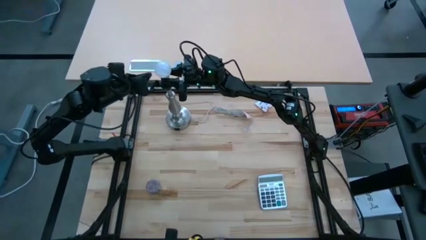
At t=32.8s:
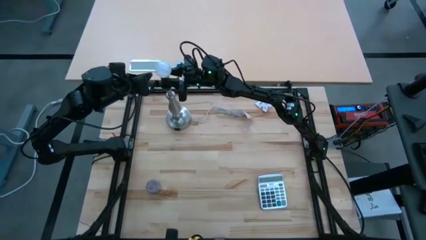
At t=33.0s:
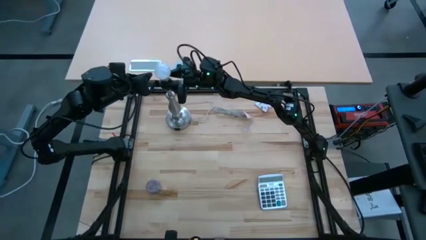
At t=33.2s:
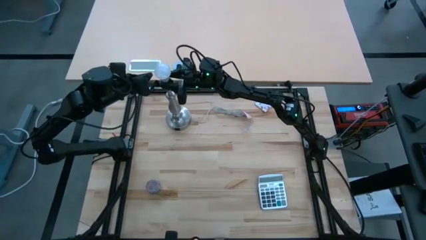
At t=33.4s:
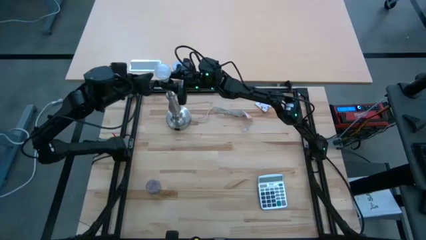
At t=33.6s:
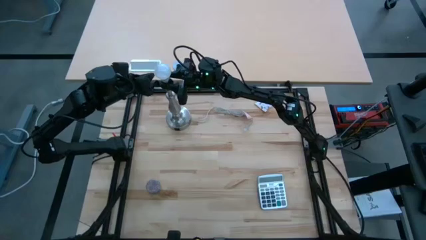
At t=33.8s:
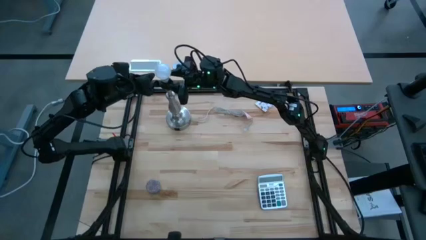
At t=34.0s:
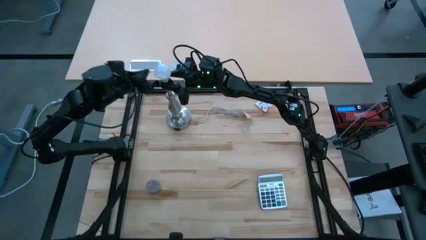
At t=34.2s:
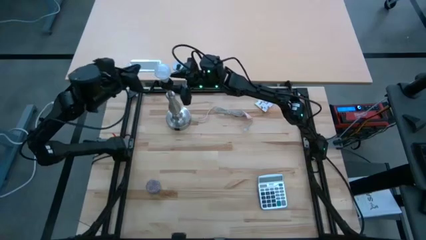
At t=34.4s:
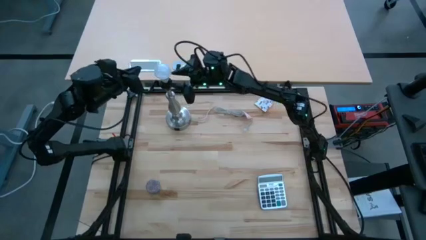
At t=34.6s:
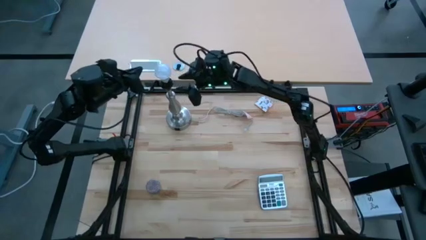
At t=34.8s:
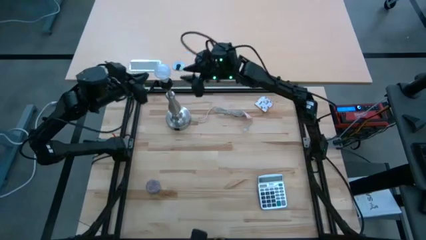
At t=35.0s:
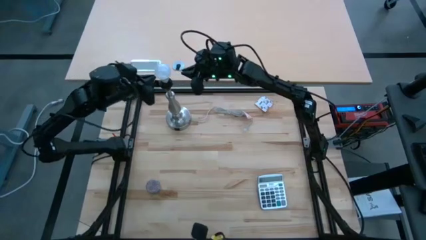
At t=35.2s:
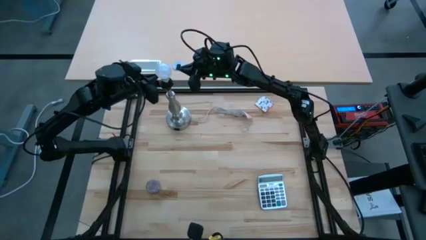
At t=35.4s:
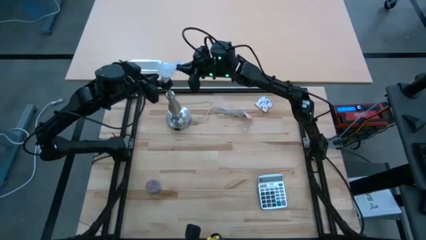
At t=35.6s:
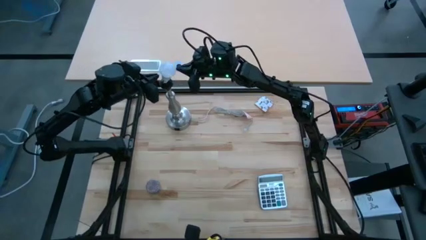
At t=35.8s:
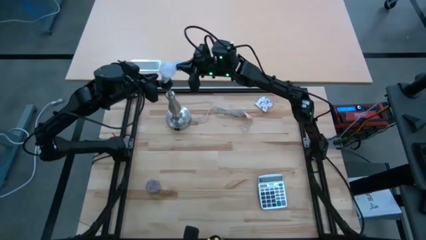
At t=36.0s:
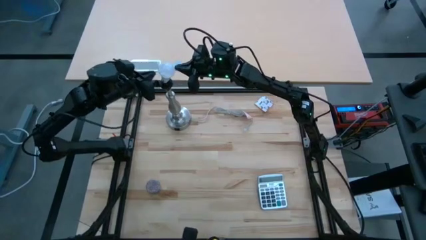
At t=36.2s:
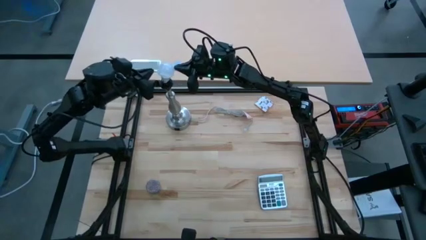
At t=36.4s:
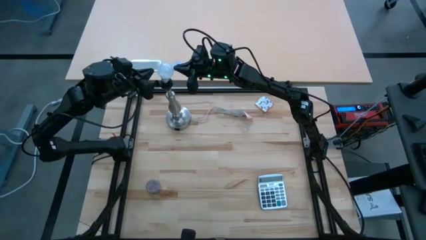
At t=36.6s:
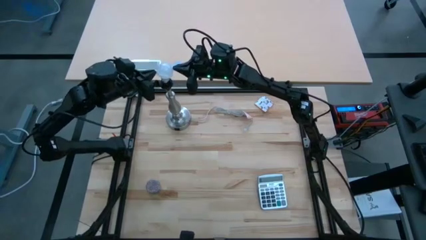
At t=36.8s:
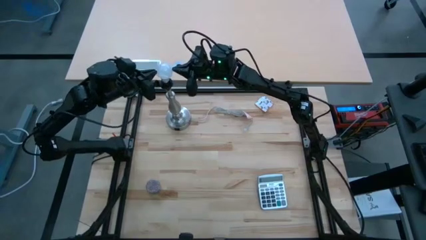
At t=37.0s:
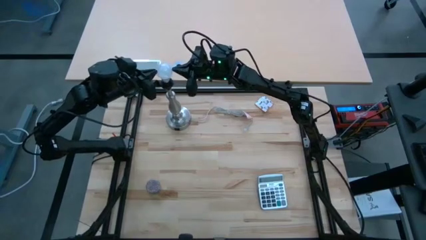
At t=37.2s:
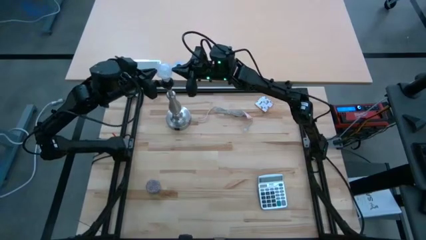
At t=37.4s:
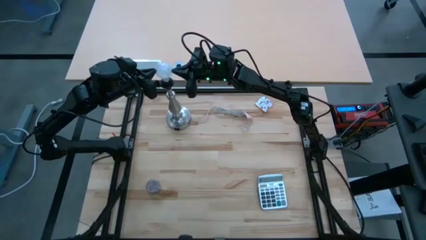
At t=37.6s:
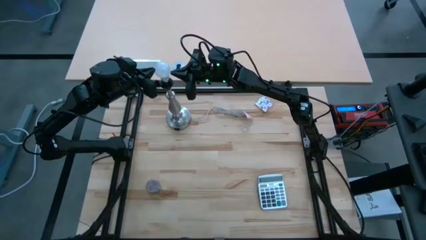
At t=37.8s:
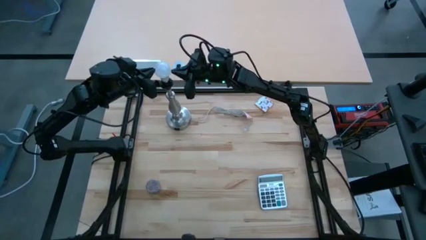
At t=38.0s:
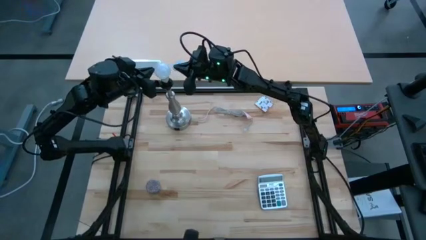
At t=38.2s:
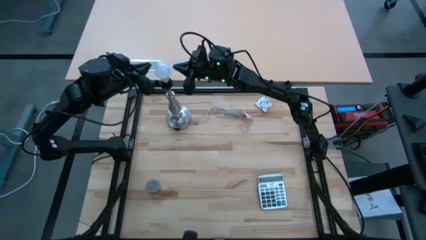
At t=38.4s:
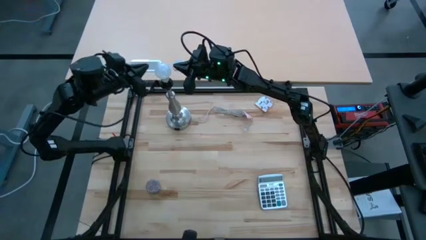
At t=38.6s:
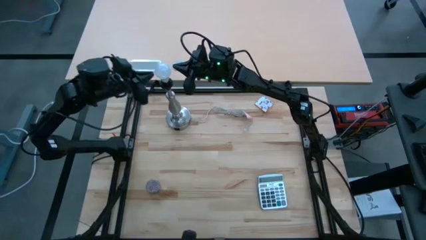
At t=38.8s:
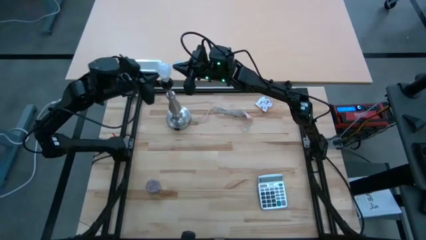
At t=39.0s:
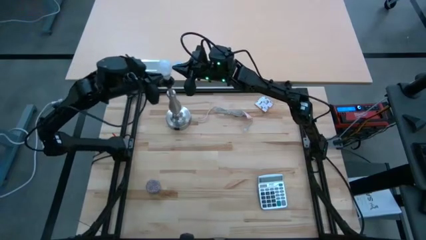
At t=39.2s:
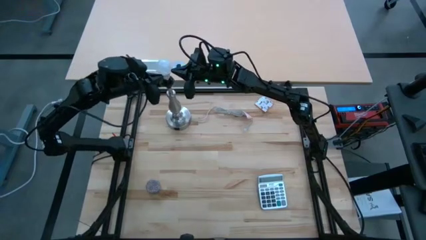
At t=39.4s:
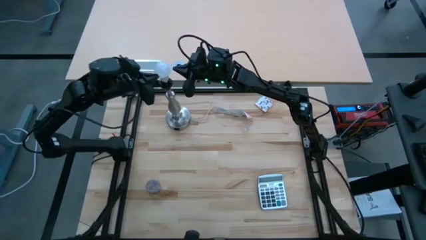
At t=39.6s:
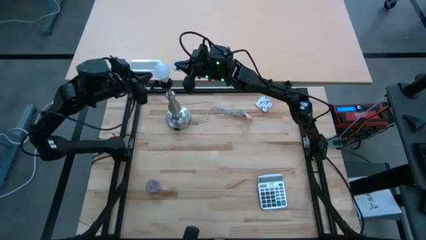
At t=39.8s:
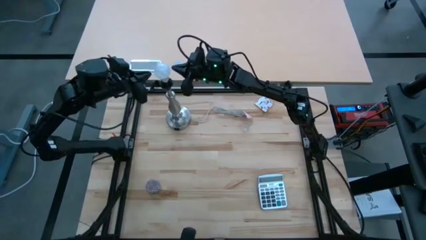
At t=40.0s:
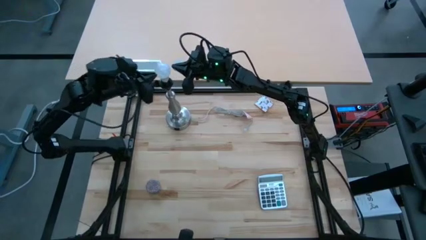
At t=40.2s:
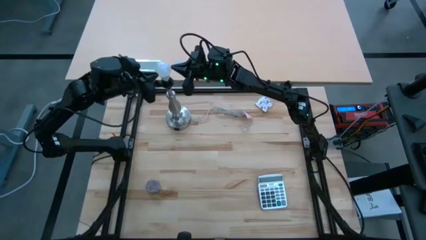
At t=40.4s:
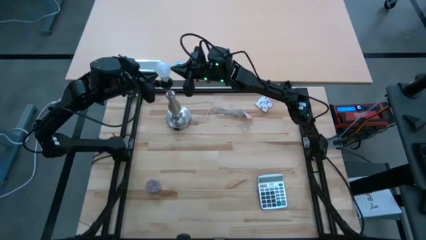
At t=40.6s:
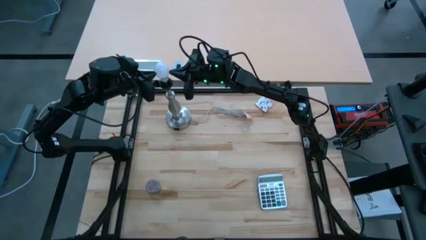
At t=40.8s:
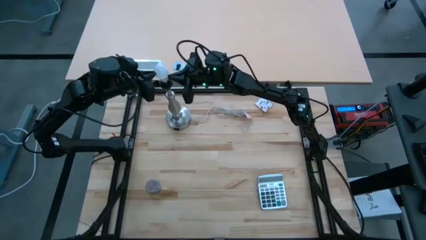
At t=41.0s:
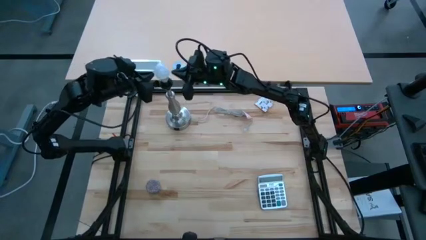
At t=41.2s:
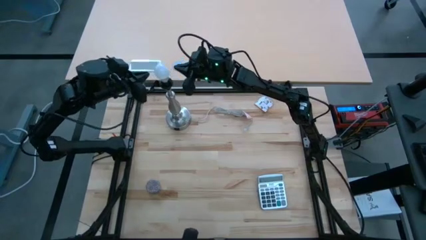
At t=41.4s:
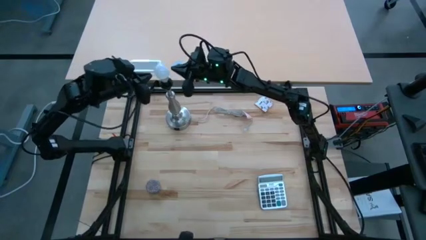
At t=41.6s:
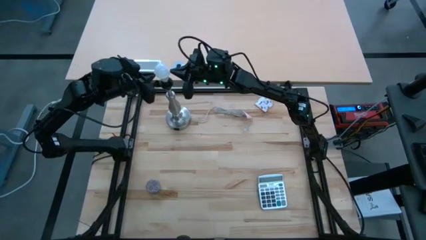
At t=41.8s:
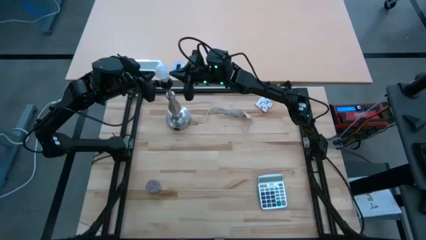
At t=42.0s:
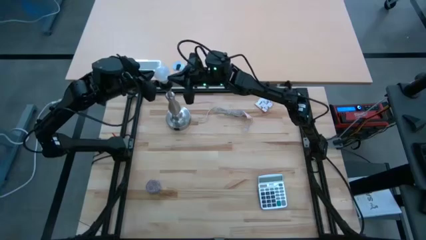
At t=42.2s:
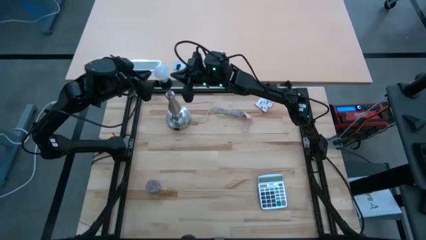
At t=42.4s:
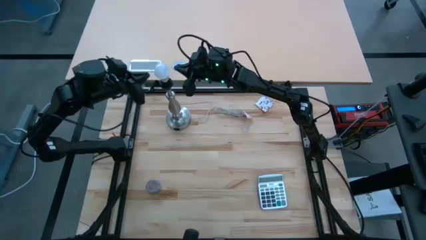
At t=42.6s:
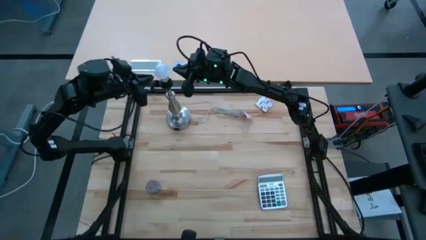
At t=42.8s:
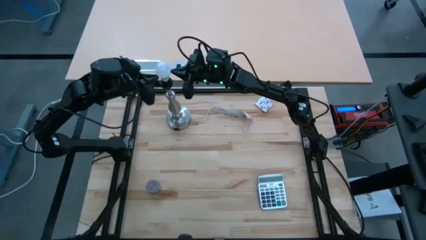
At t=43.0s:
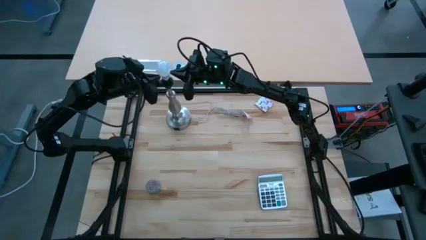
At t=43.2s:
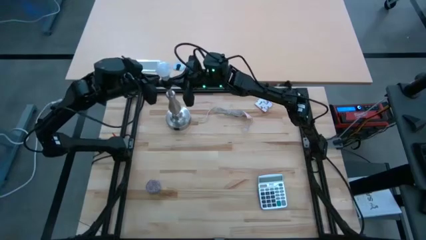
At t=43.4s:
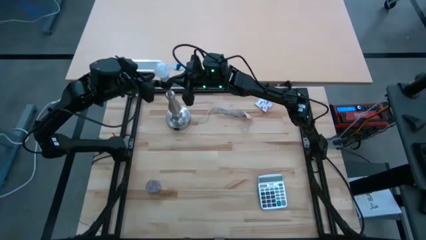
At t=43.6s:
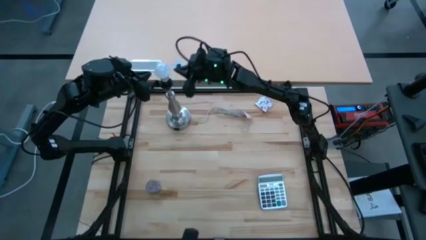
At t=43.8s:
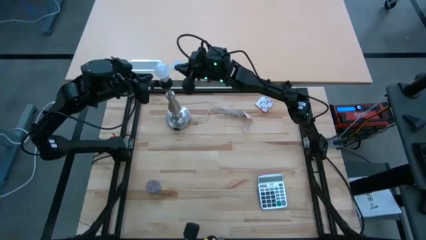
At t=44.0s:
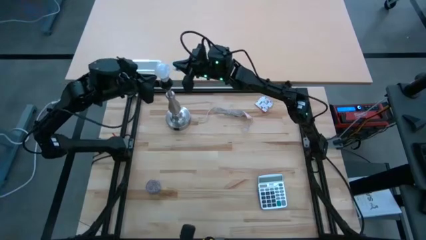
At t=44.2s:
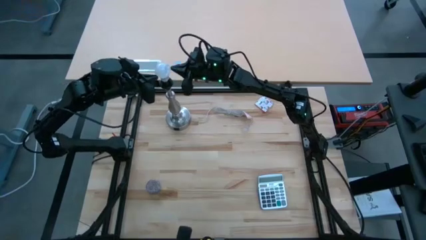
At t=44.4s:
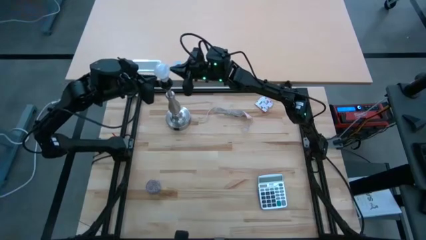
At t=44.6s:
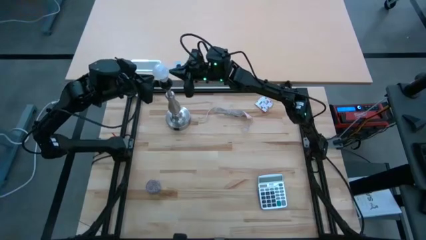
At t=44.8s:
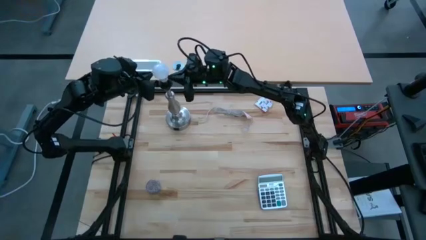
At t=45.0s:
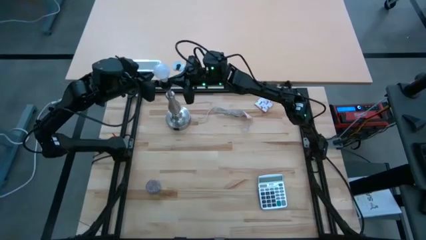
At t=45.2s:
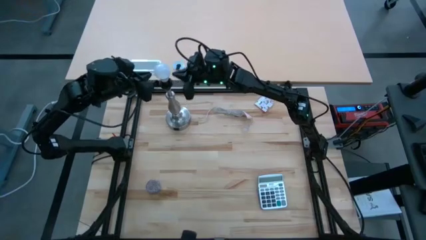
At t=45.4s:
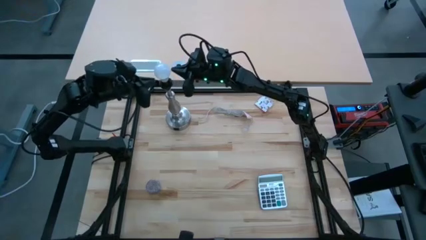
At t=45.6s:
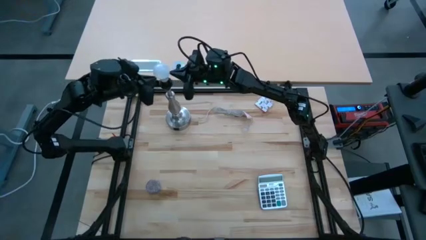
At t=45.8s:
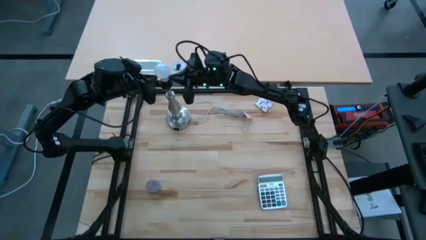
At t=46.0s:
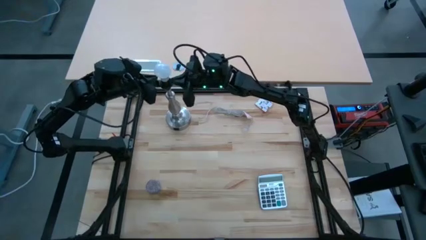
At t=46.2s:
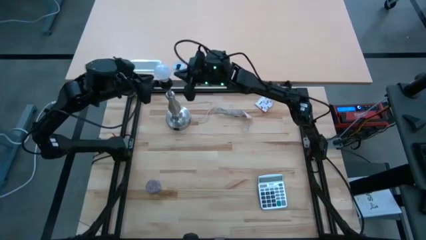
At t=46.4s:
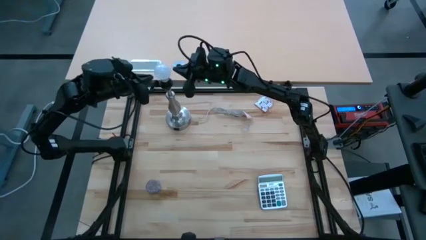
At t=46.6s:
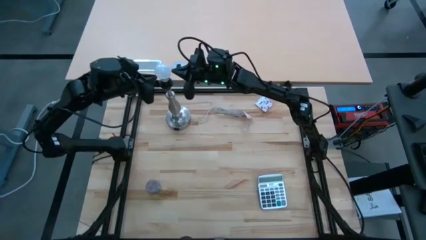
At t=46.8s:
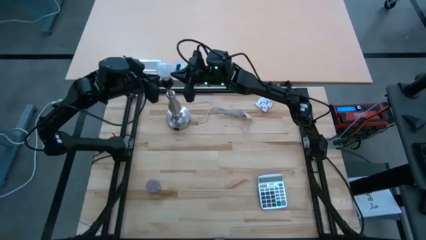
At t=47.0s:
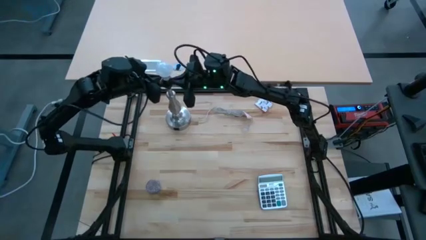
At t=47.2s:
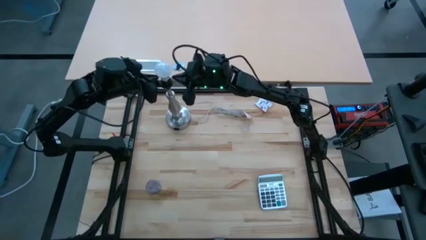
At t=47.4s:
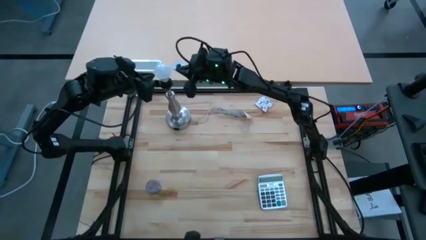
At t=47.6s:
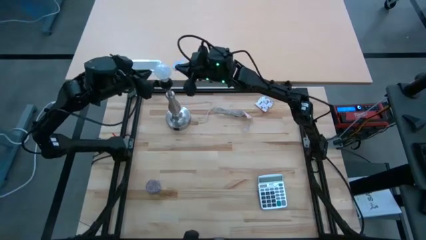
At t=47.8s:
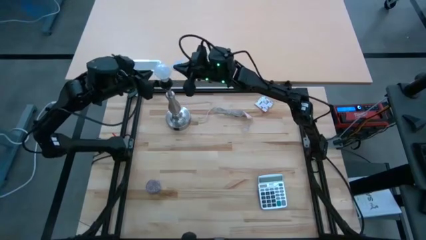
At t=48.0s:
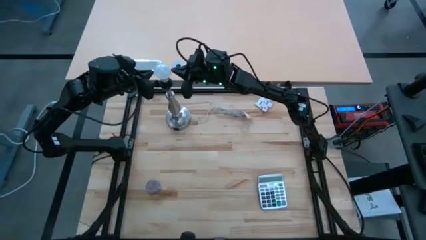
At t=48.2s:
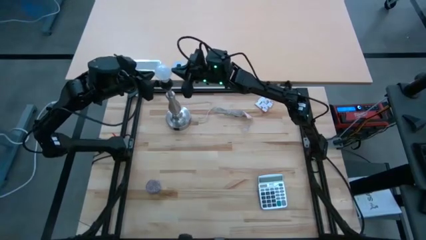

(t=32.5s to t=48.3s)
Task: Screw lightbulb
Insert the lightbulb into the lamp
